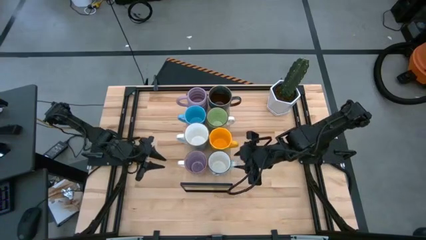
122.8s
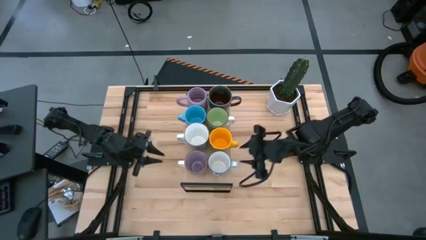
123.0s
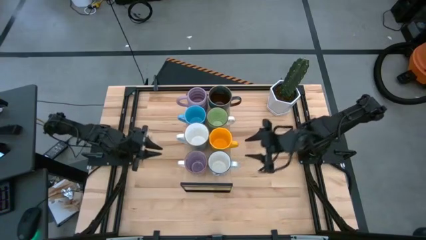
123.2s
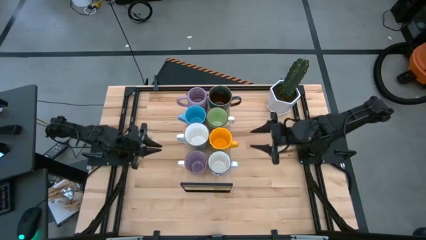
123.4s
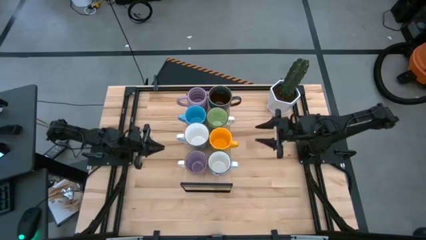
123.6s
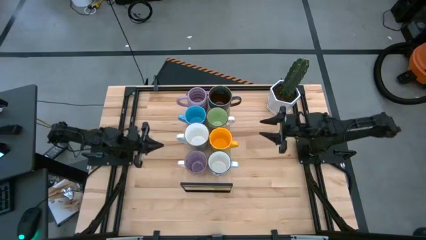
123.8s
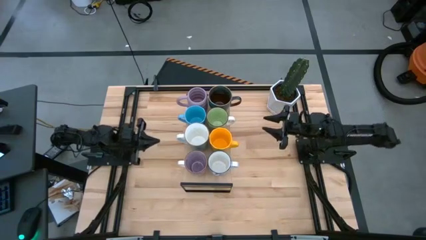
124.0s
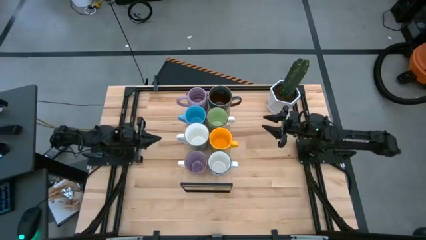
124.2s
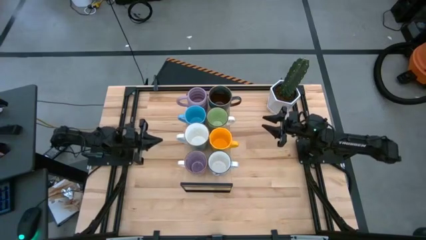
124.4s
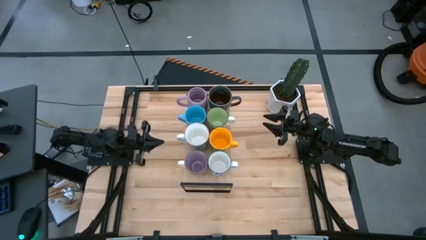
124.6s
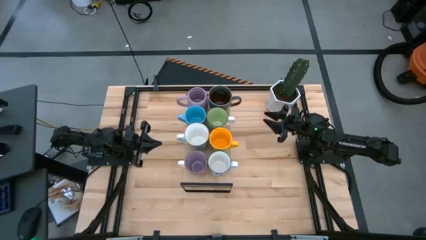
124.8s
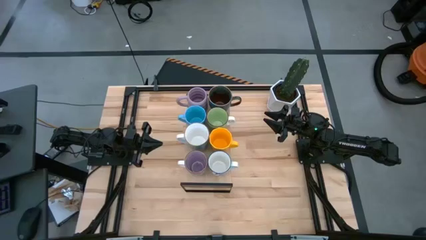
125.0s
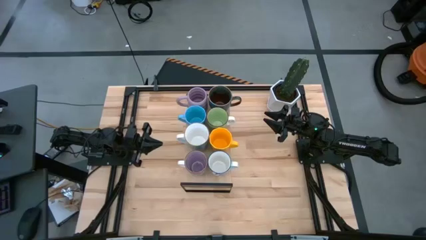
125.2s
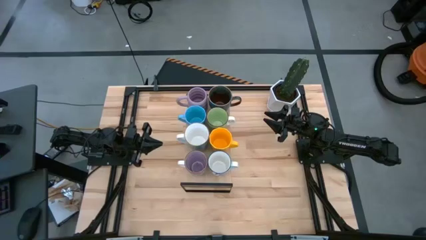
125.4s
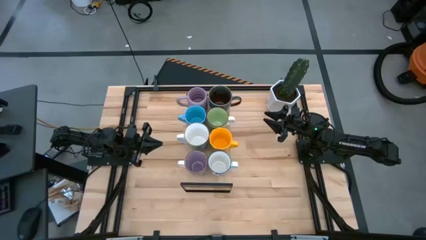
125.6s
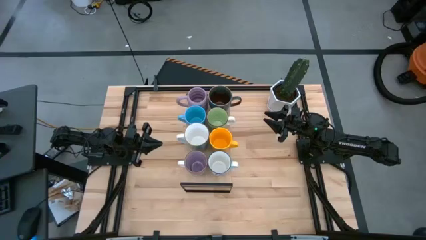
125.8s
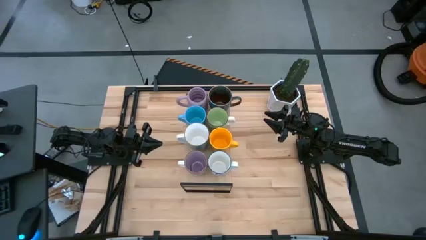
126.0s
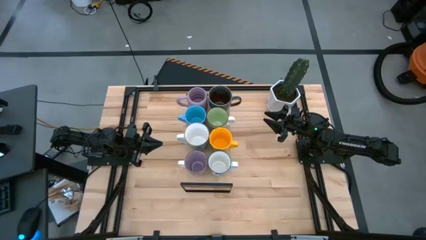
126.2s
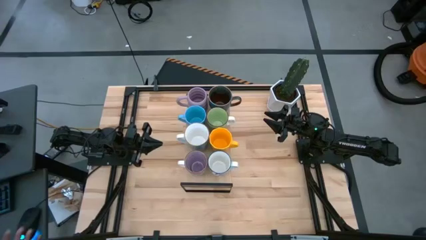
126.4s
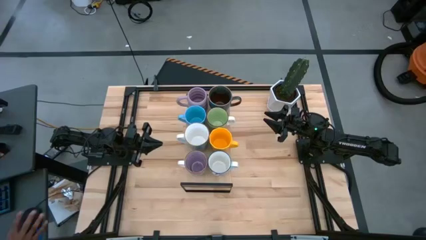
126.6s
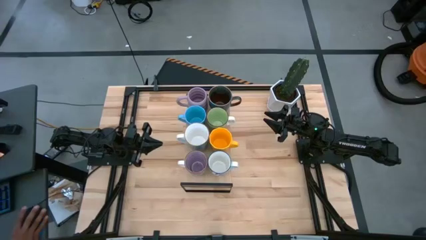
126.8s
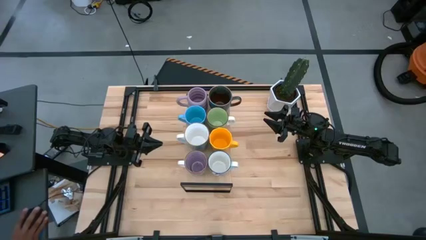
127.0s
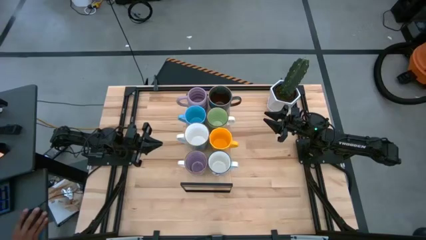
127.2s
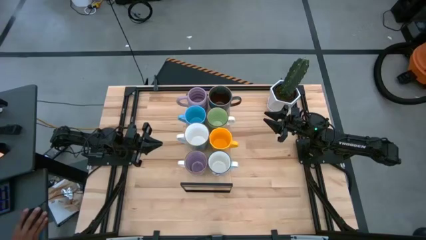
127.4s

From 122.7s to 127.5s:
Task: Place coffee mugs
Return to Home Position

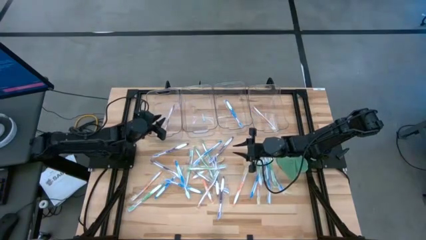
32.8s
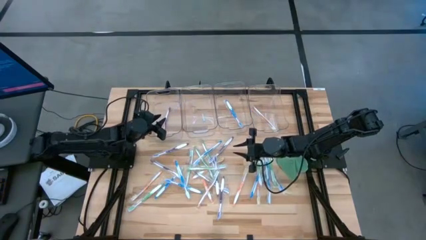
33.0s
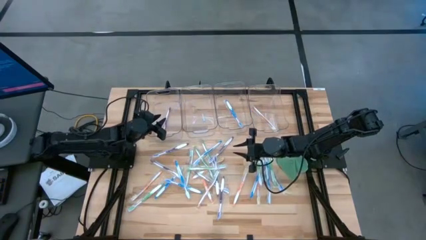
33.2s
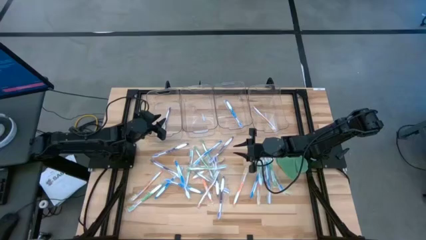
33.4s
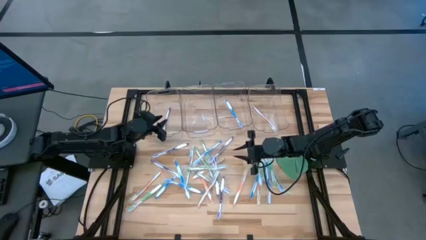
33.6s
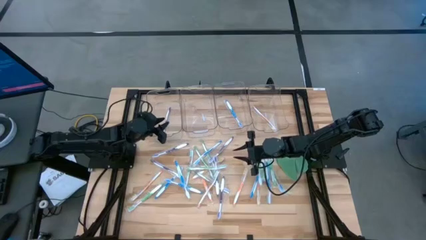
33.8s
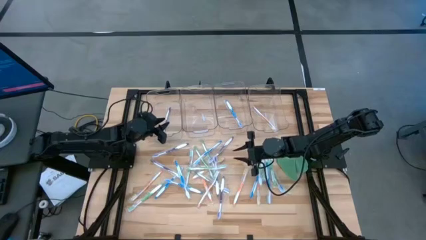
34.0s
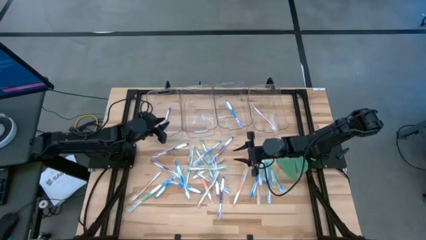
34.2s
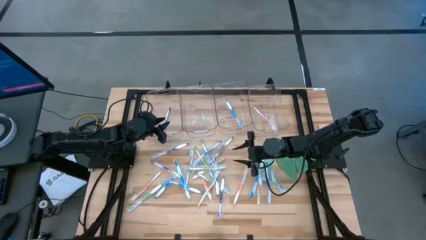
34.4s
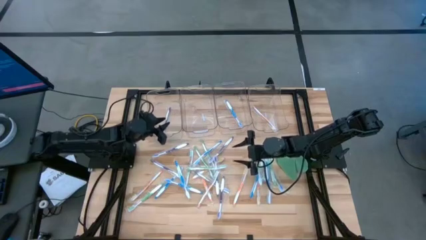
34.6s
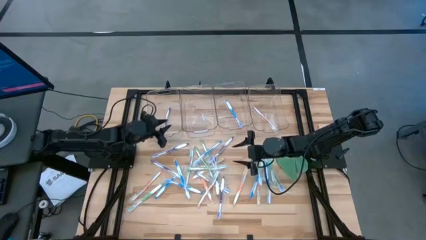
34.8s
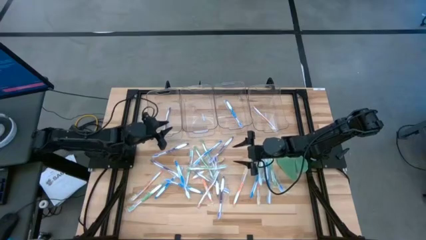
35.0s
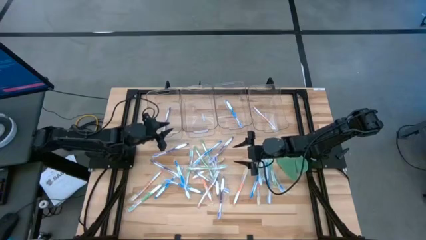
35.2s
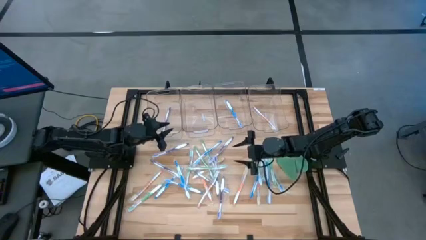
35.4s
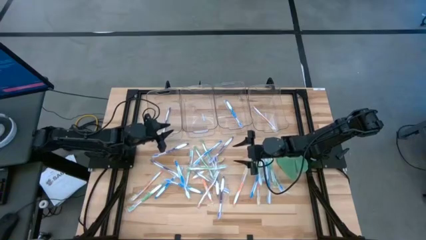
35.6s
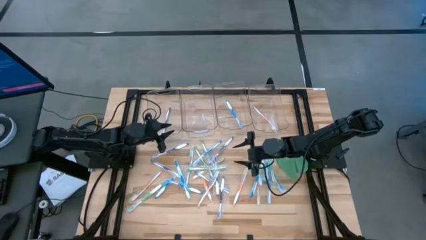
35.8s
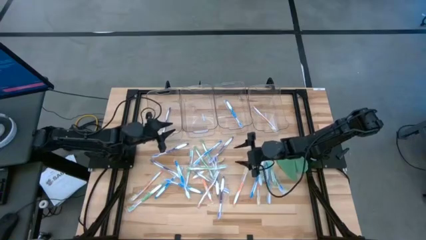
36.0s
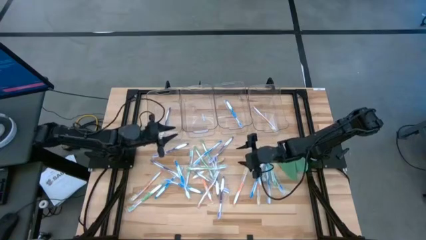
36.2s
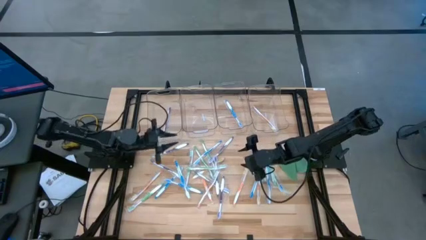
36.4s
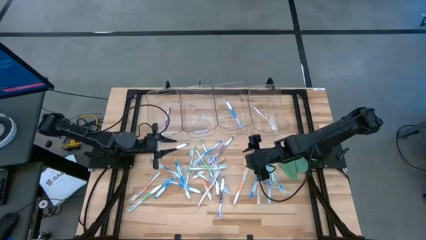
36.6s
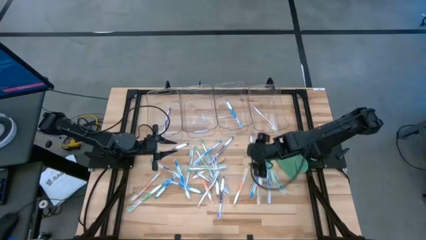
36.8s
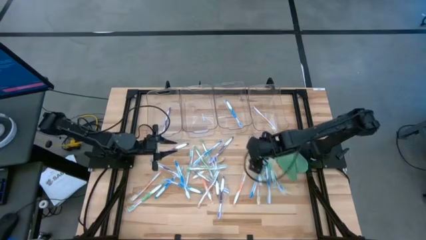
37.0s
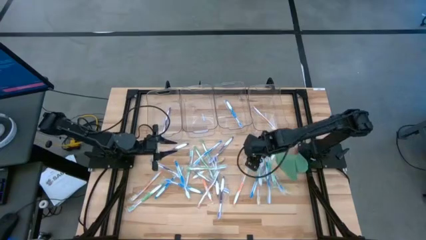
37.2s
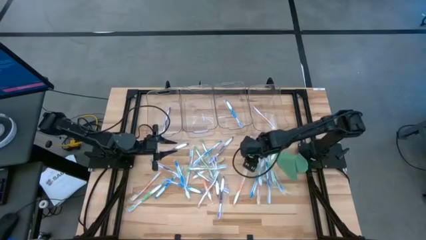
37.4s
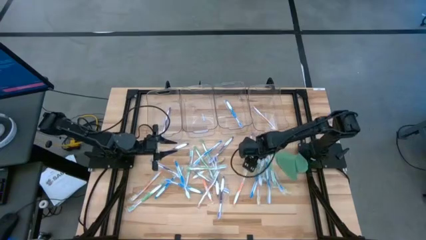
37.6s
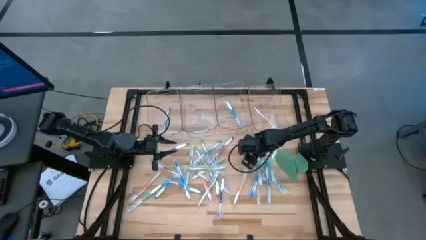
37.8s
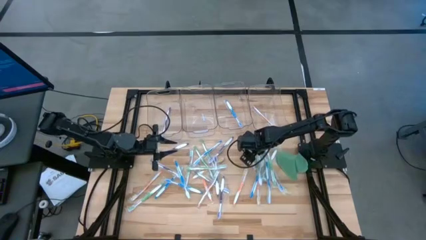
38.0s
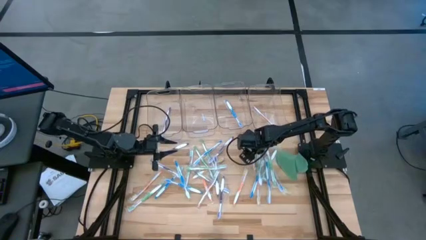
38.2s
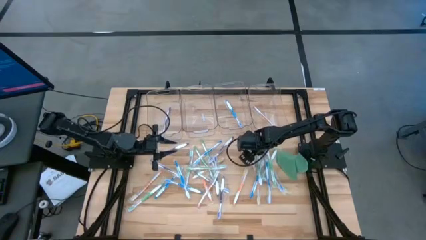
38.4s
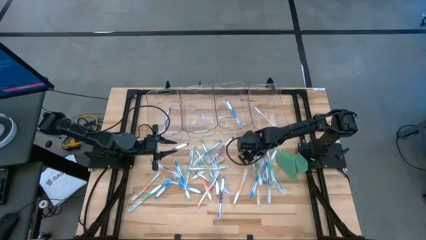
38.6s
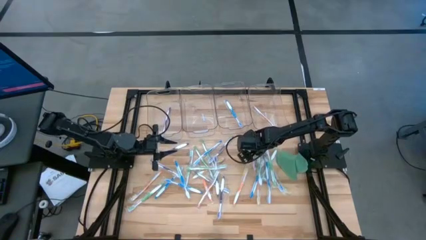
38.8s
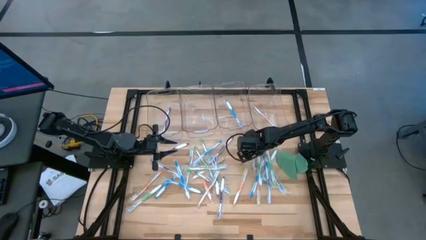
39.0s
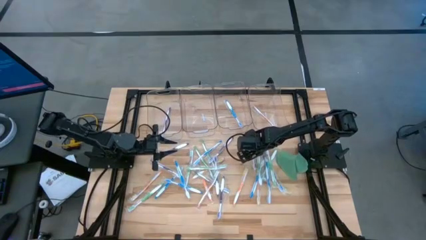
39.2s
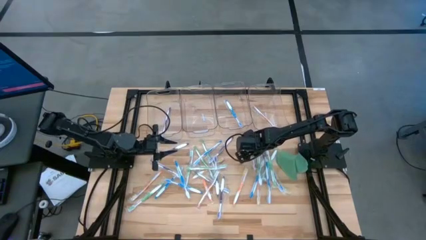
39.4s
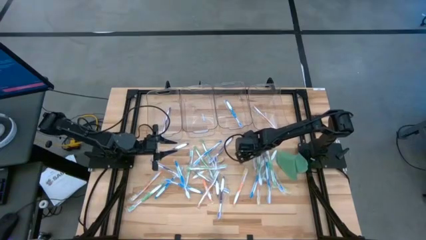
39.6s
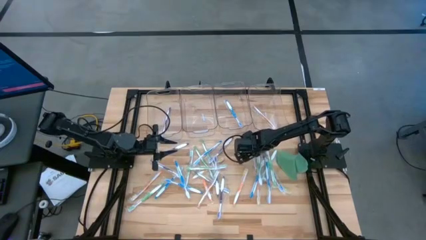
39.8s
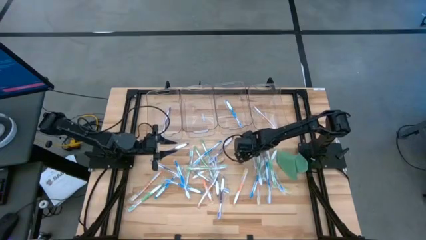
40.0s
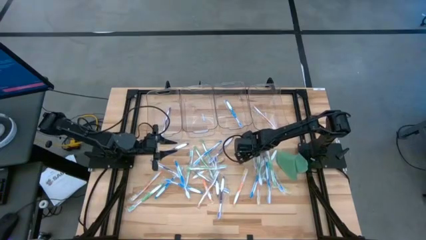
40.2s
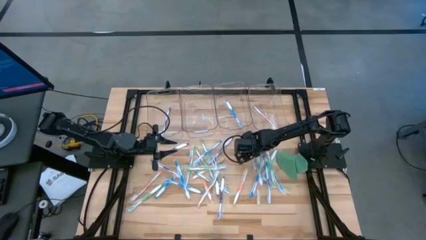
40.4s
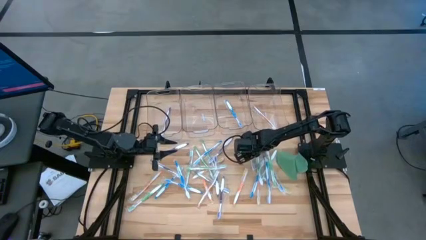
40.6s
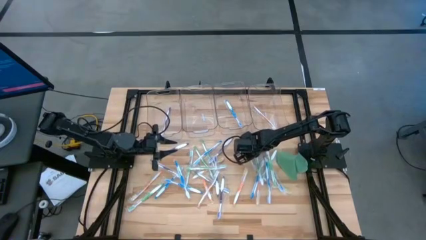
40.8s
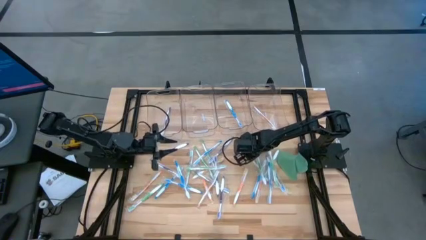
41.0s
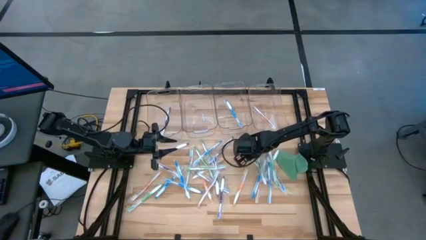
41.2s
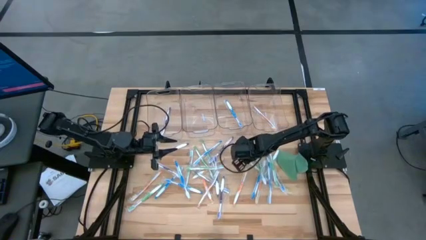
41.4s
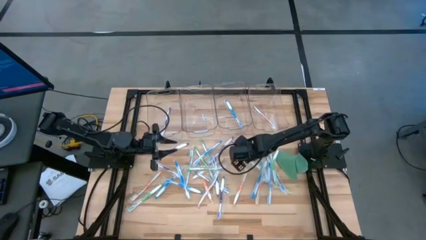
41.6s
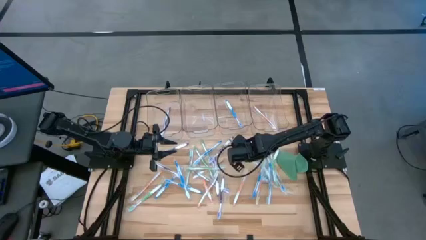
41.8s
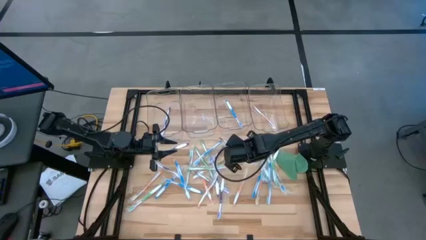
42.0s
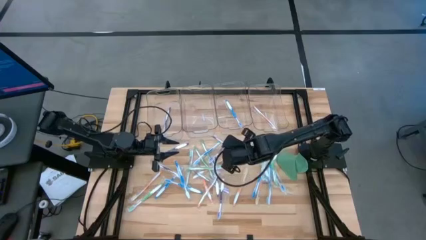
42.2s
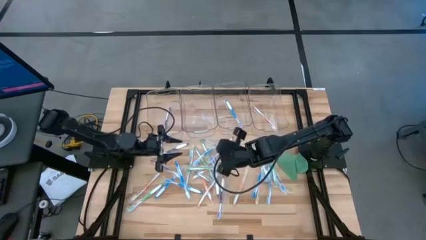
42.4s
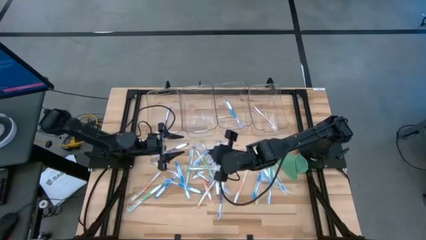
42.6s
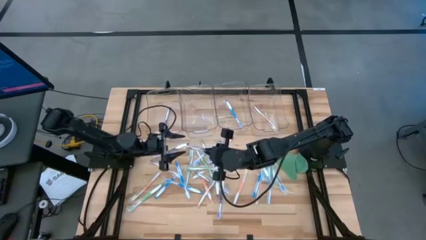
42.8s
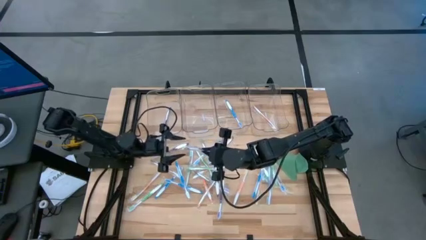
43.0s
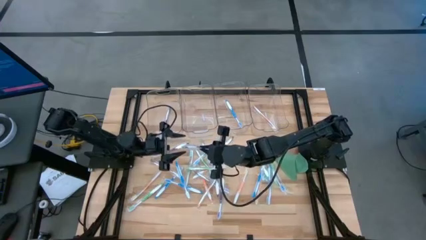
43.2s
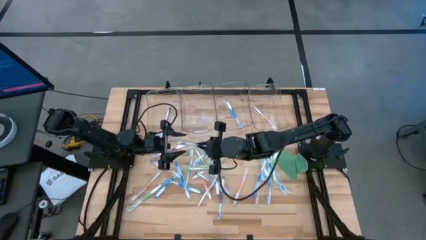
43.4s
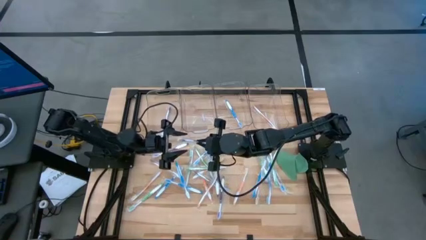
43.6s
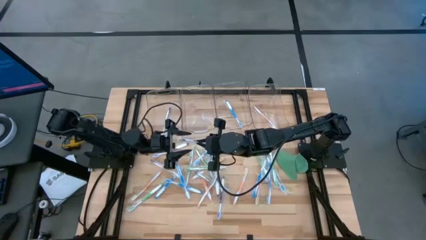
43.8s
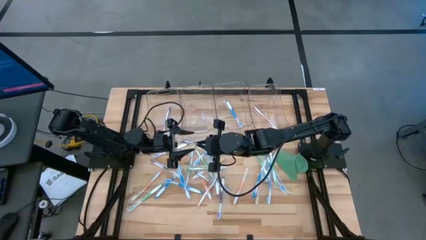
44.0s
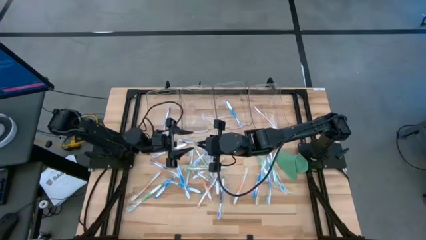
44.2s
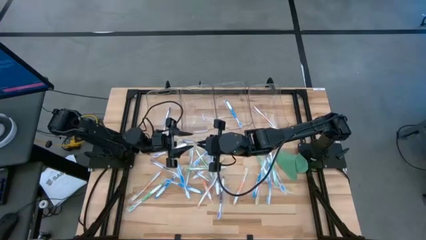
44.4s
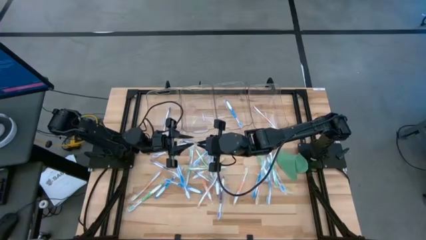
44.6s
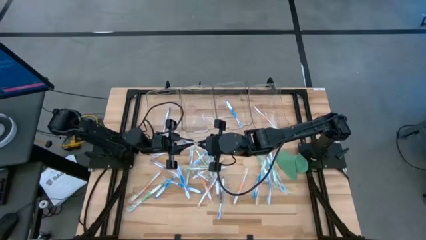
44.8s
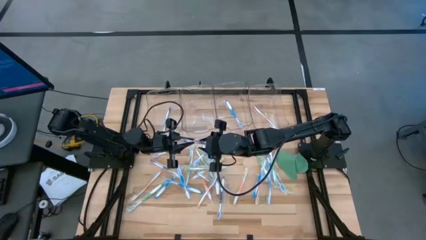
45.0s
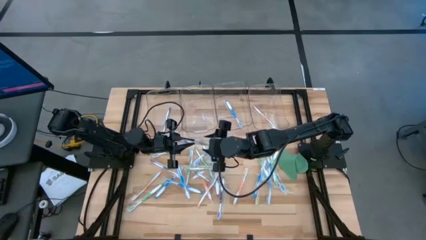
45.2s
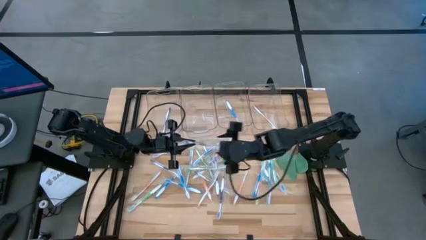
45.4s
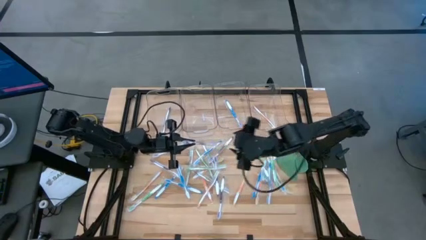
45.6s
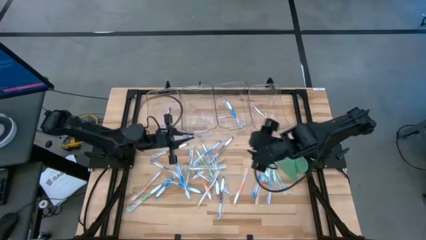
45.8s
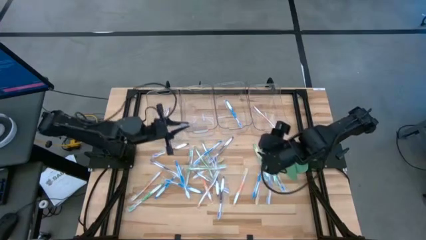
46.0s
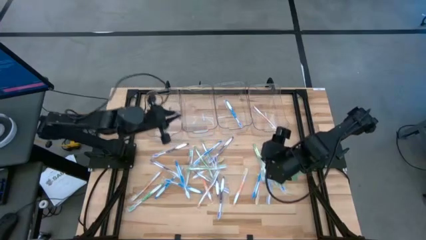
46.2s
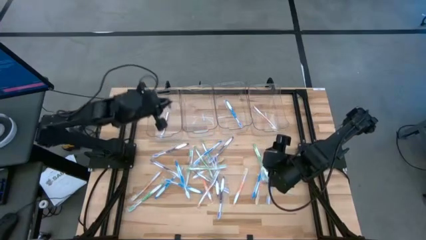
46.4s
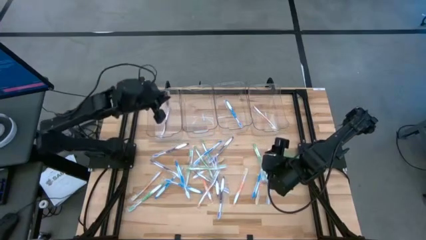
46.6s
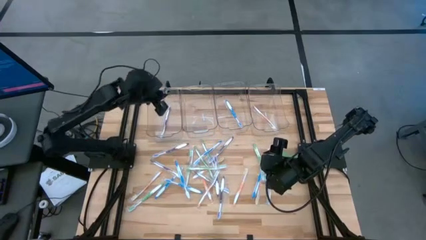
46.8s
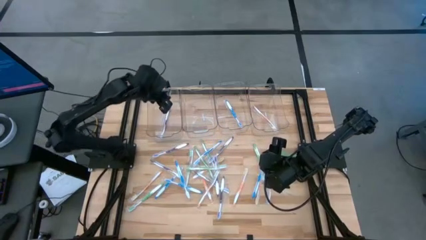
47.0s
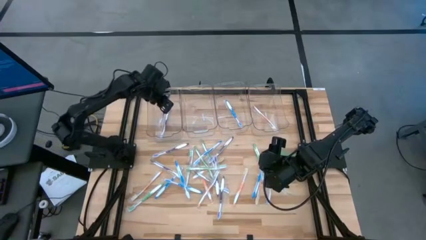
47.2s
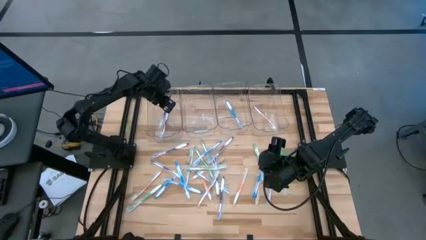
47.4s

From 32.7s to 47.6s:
Task: Pick & Place Toothbrushes
Put the purple toothbrush into the left transparent bin
